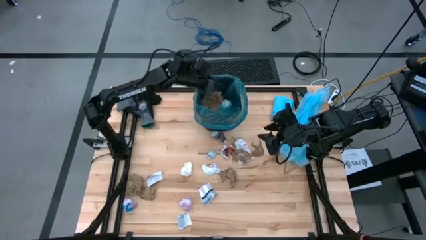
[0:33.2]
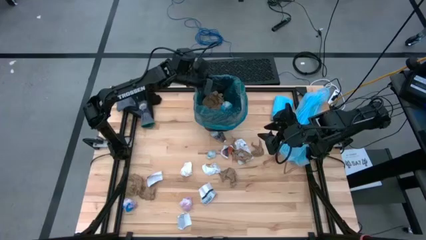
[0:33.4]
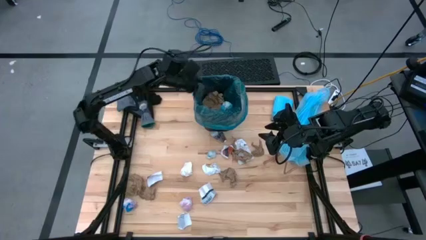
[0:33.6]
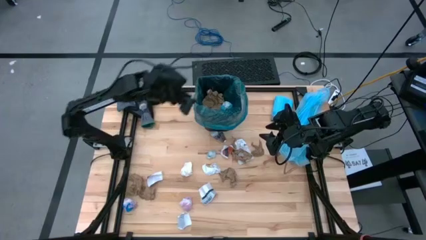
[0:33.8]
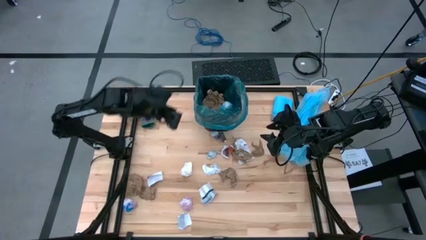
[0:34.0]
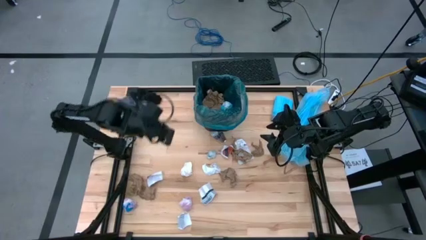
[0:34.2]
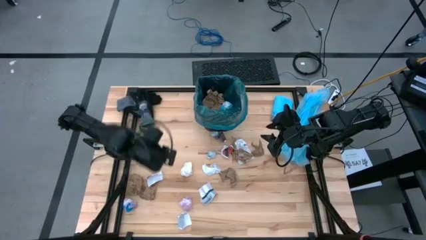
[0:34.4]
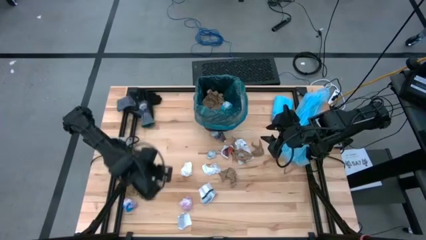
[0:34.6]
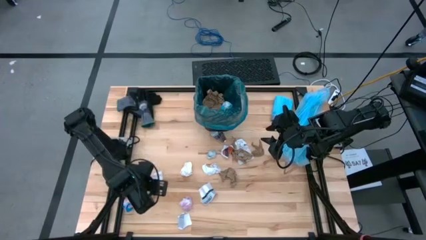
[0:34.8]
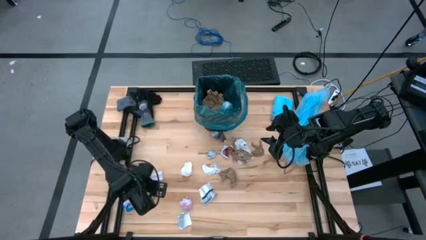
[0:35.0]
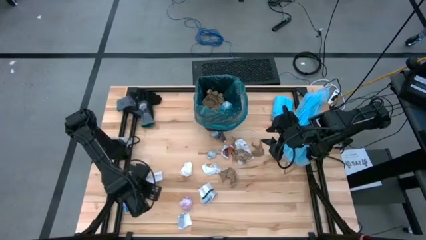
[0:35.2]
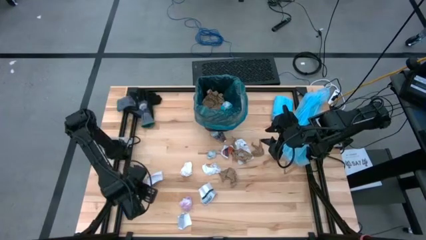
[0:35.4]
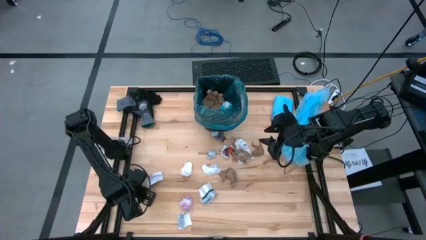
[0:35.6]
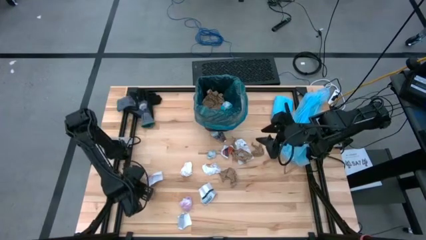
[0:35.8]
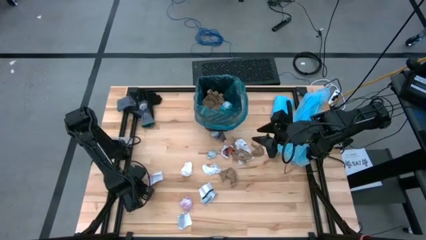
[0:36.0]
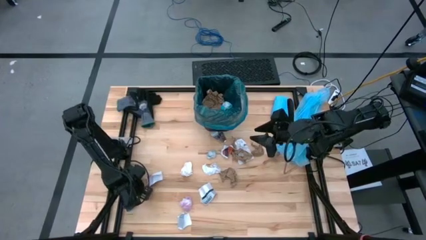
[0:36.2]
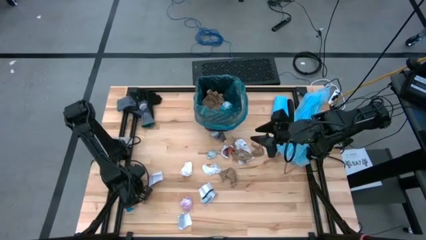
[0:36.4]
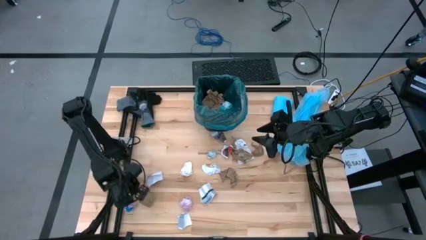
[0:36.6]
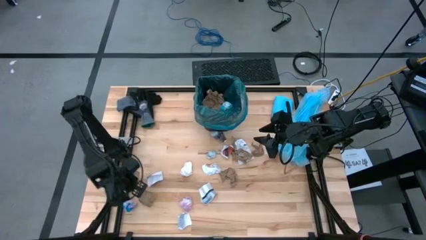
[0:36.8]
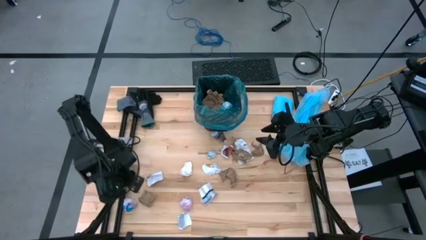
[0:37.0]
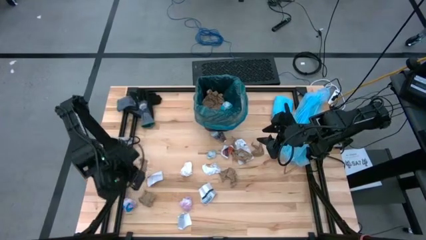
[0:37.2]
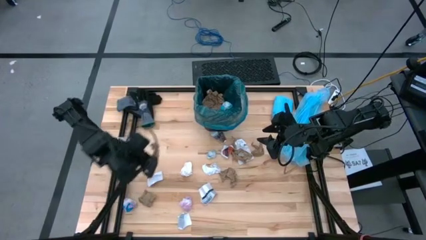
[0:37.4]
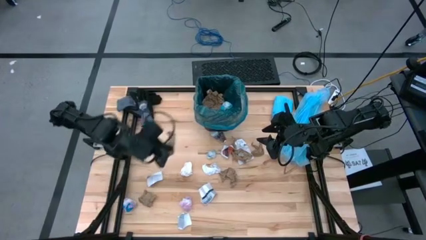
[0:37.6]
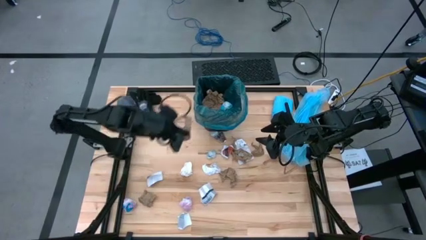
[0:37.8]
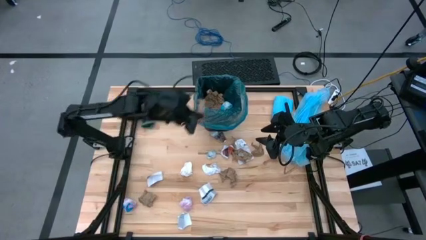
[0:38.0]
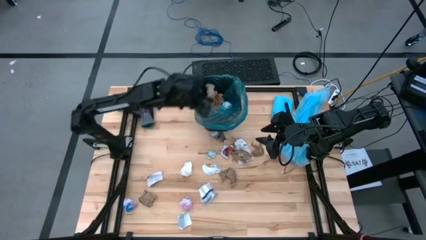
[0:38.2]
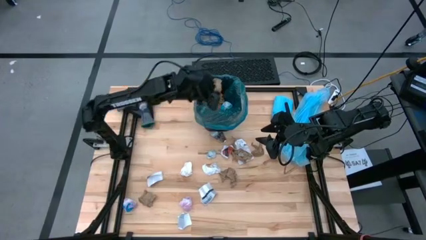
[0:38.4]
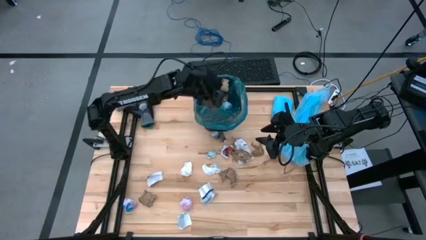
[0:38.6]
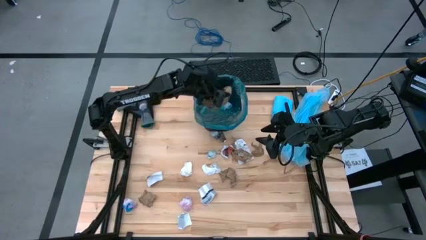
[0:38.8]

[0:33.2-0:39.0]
Task: place trash/remove bag and relplace
Put the brown napkin into the trash bin

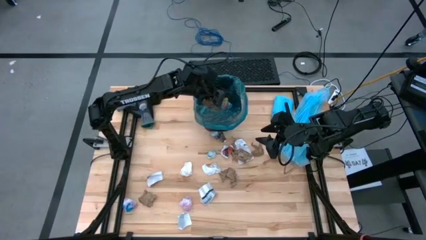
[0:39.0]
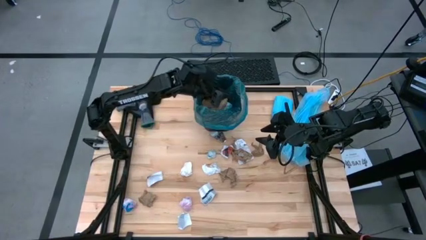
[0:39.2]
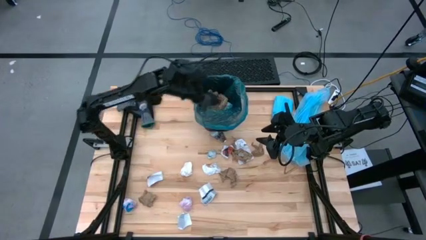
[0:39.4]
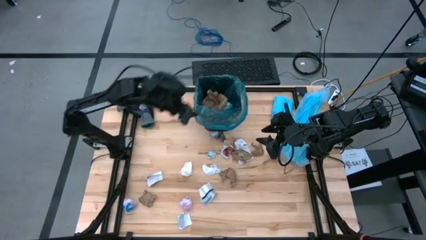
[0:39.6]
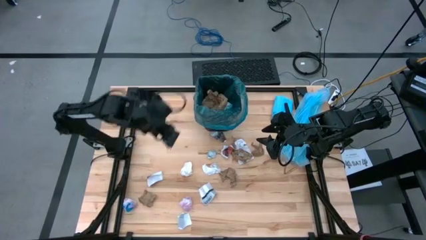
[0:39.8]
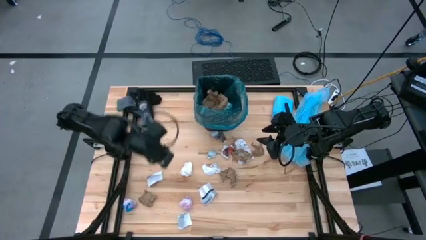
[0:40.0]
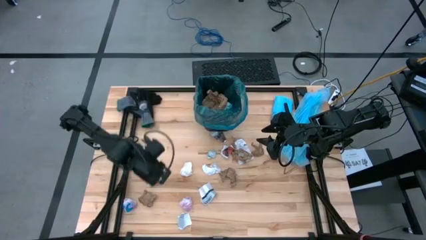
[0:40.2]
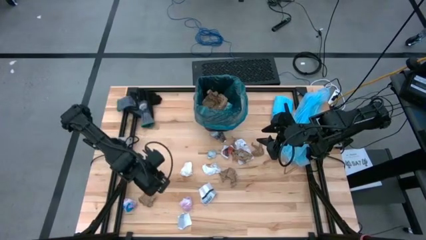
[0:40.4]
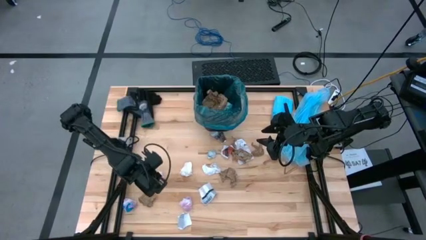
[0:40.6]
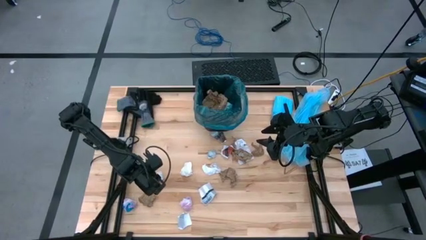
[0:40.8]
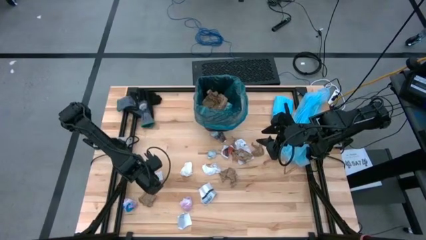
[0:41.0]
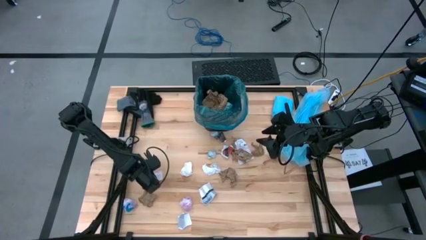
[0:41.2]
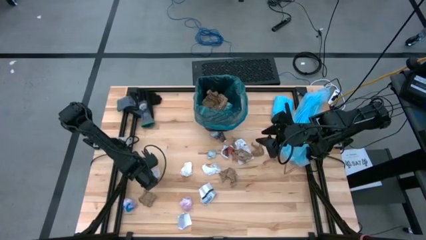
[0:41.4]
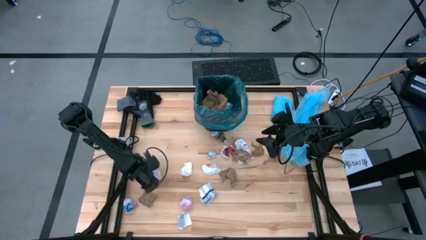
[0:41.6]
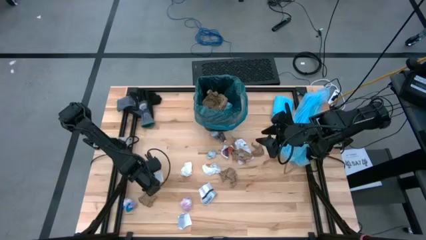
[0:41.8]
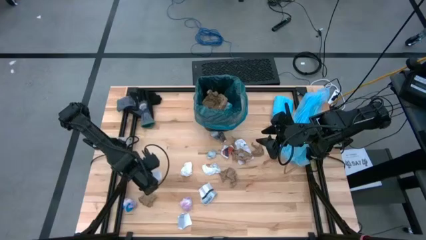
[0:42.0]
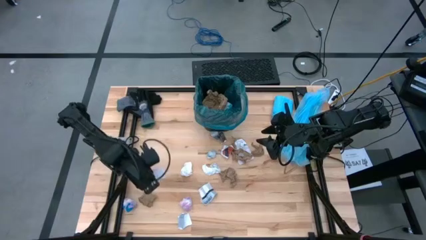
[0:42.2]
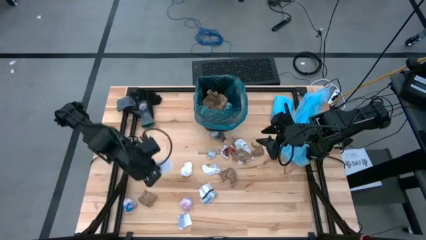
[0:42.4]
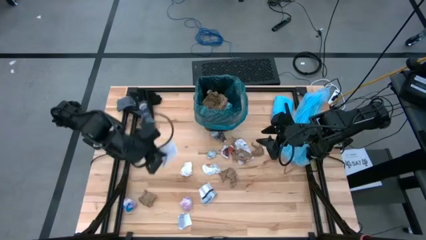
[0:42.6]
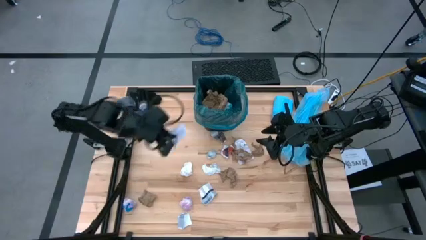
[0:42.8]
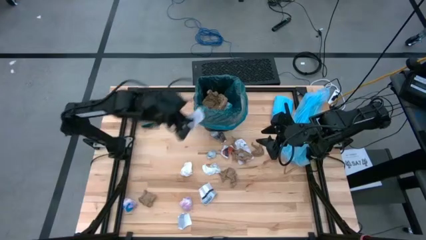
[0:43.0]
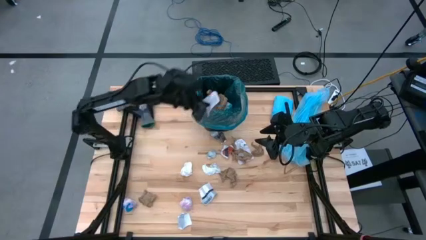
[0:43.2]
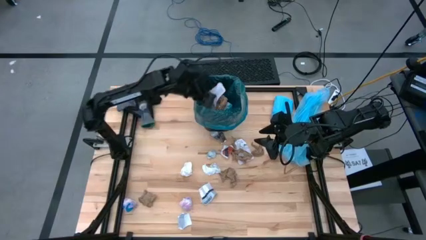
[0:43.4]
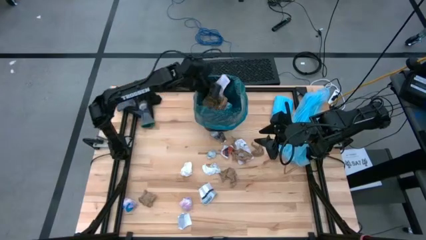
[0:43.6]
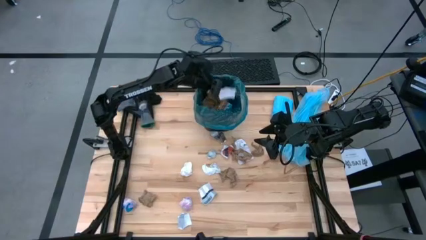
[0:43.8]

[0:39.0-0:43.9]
Put the white paper into the trash bin

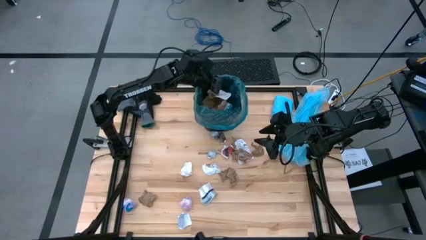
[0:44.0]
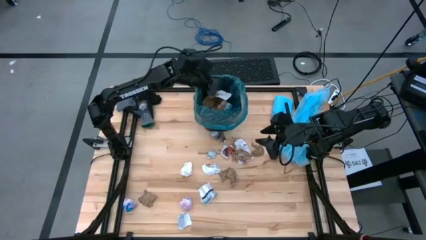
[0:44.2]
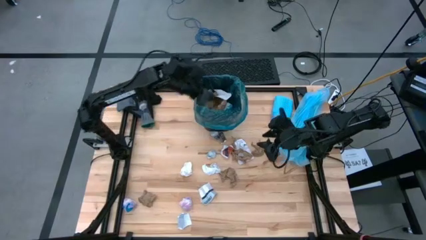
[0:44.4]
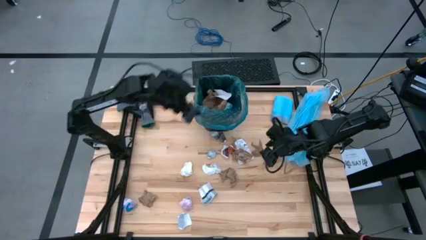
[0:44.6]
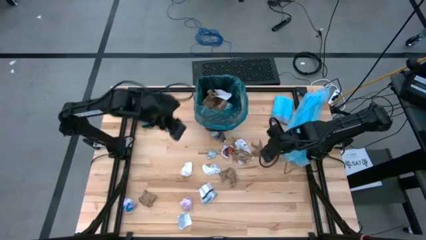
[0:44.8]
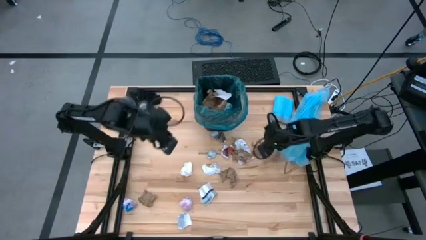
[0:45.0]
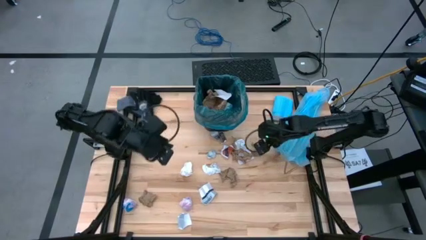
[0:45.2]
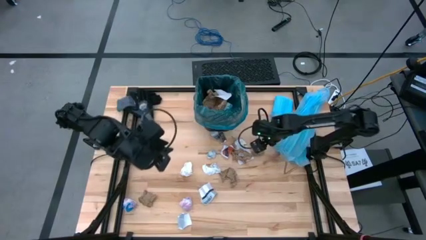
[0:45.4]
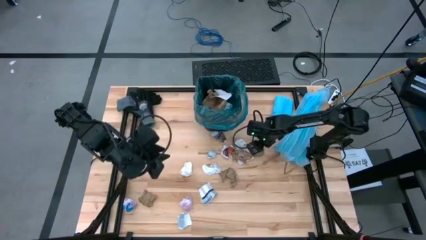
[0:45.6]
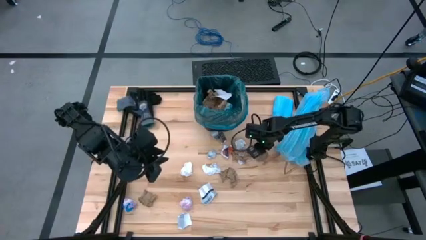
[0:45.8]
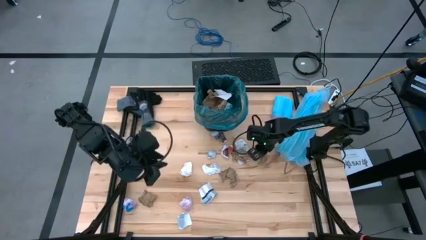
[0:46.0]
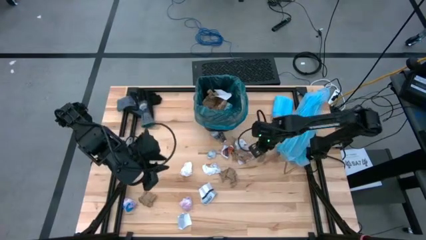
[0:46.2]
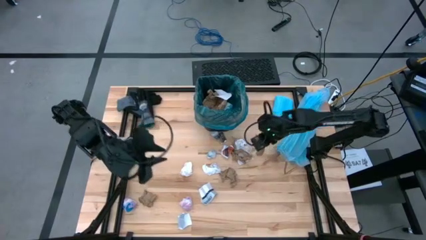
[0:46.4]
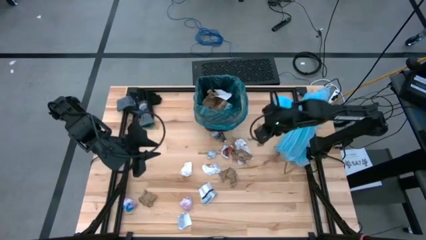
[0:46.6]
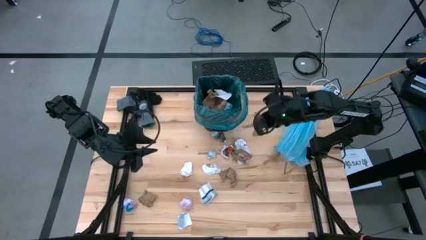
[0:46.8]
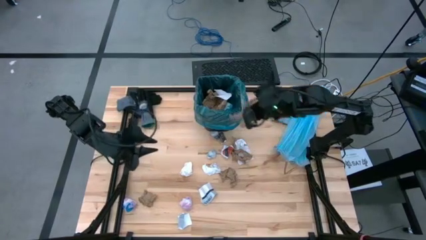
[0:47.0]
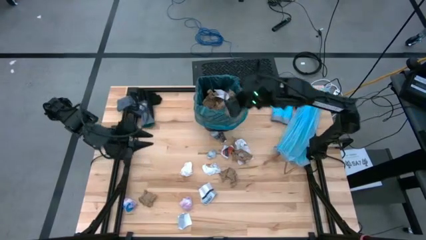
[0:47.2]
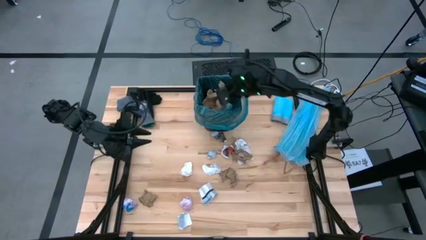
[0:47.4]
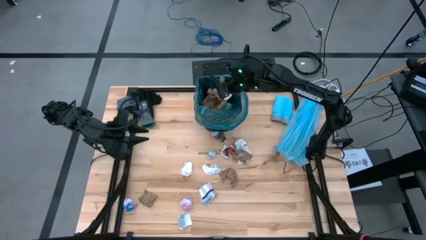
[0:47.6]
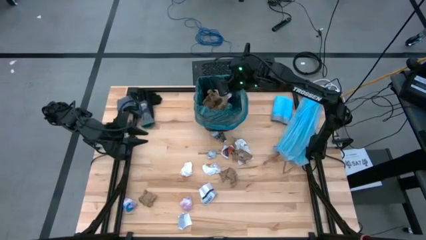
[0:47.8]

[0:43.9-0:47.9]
Put the brown napkin into the trash bin

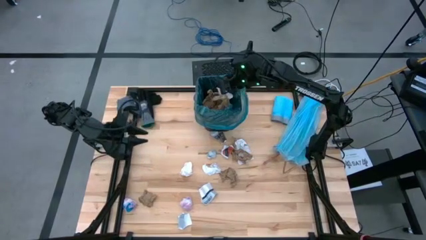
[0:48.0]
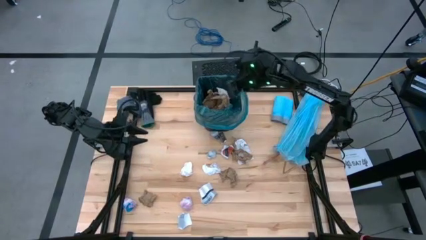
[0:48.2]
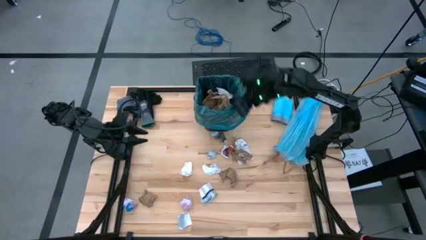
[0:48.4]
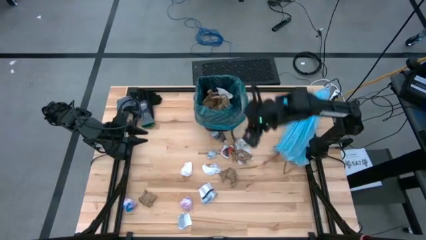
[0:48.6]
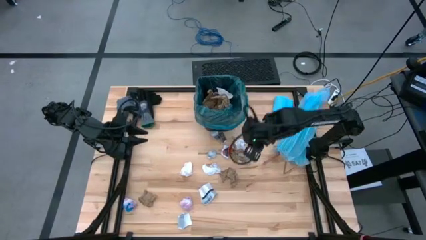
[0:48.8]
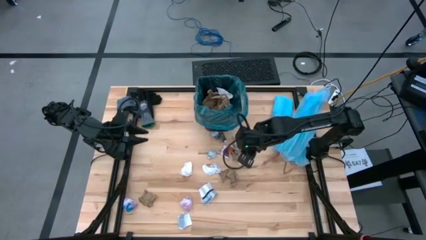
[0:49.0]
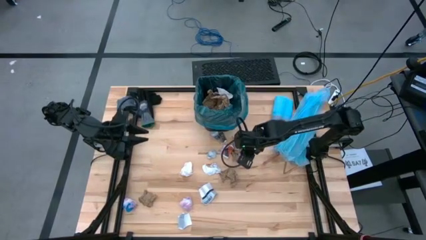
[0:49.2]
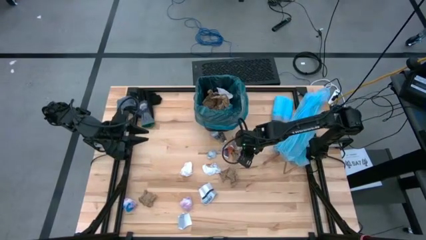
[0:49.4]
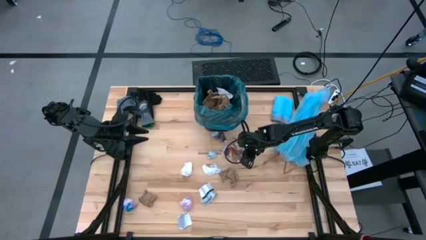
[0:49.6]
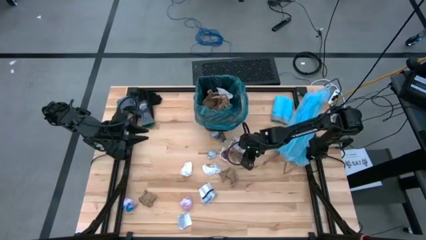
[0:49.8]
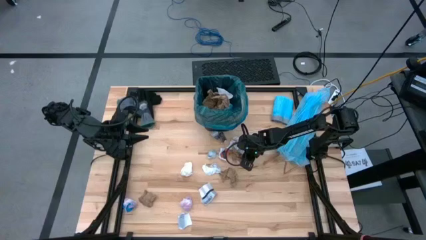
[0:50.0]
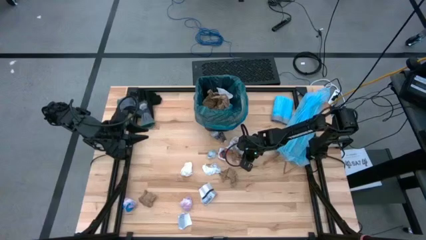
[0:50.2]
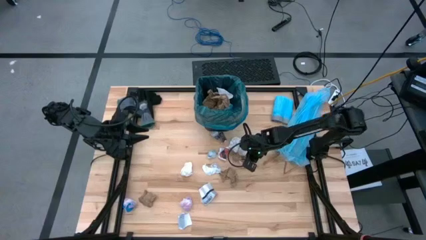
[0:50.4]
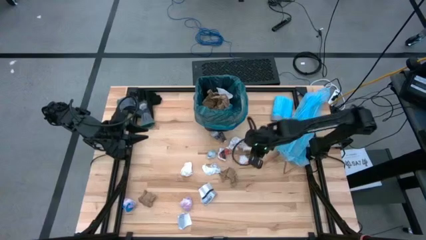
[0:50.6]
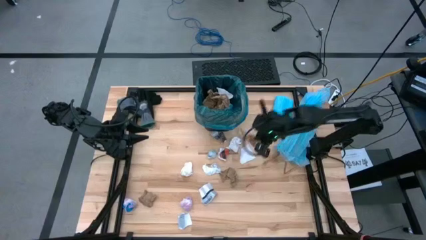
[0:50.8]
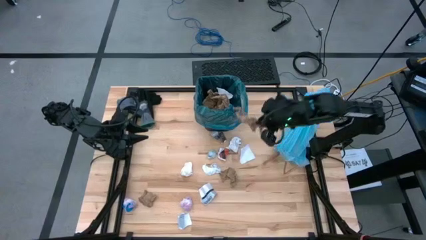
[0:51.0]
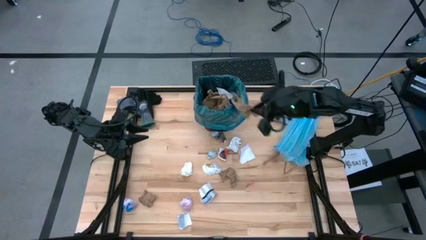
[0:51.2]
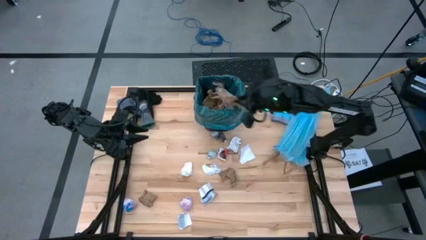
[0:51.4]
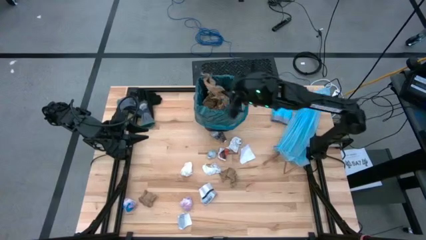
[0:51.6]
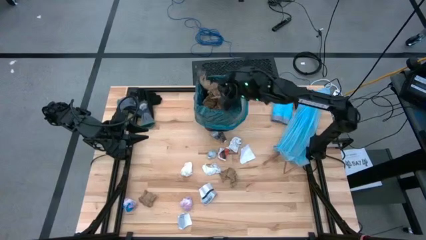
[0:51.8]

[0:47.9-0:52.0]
Put the brown napkin into the trash bin
